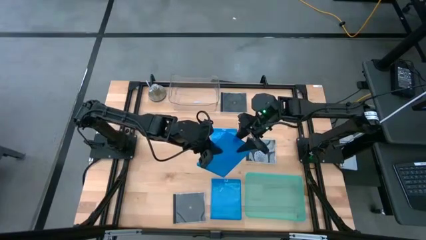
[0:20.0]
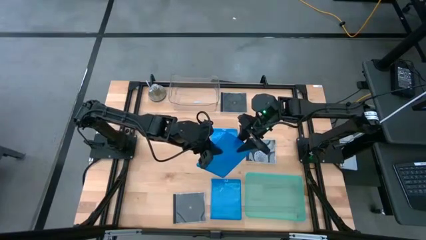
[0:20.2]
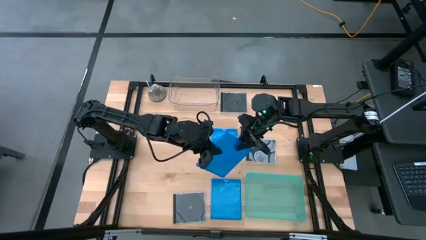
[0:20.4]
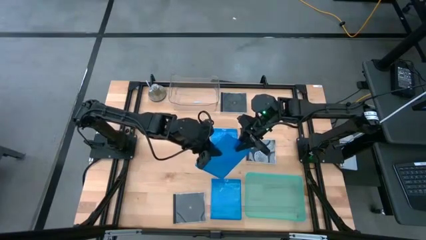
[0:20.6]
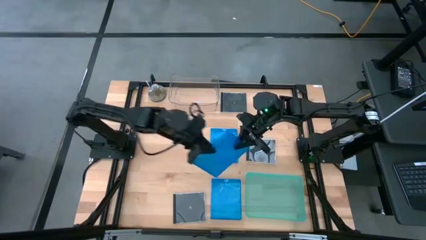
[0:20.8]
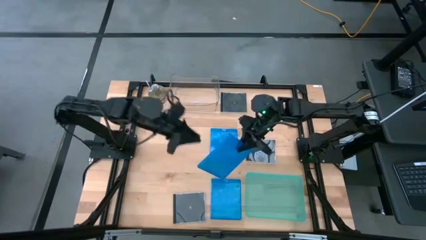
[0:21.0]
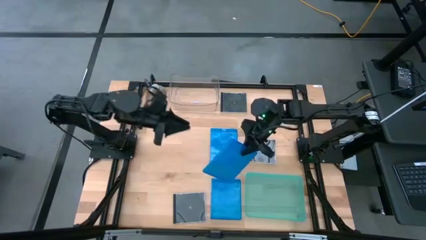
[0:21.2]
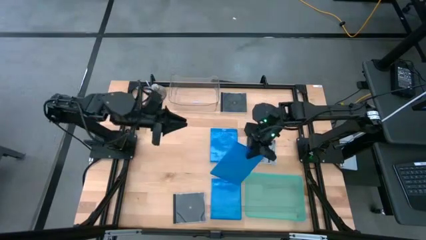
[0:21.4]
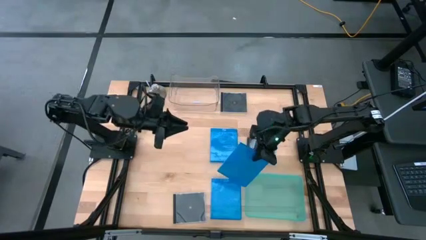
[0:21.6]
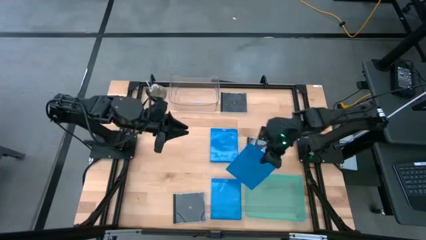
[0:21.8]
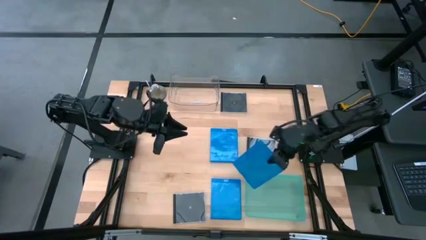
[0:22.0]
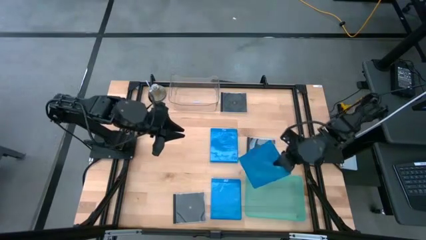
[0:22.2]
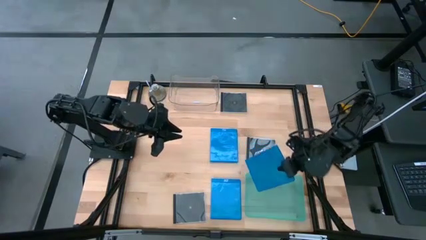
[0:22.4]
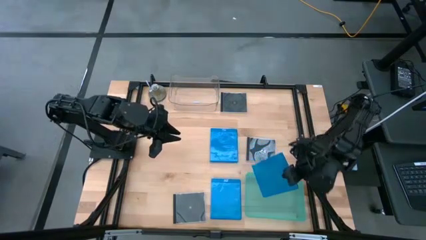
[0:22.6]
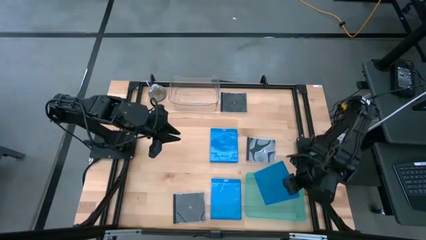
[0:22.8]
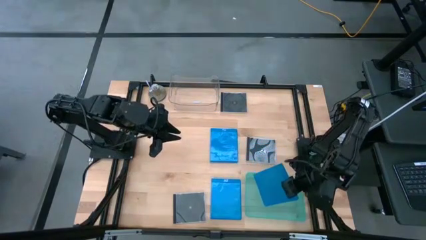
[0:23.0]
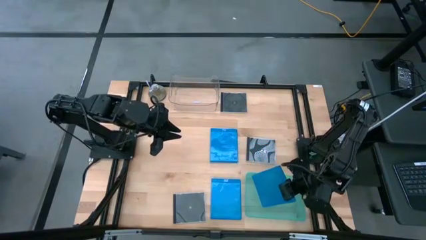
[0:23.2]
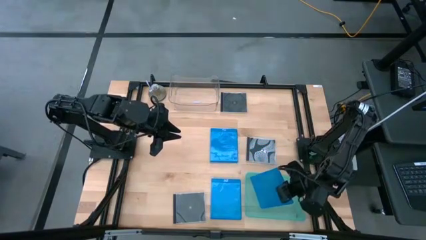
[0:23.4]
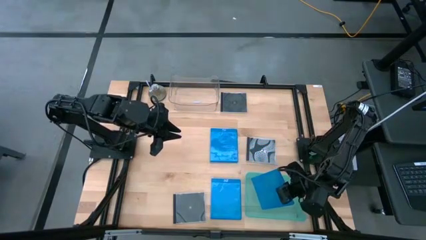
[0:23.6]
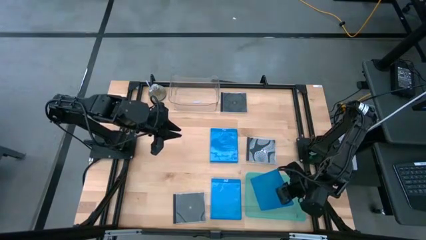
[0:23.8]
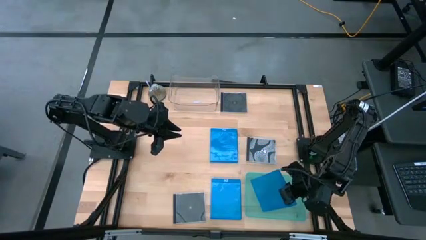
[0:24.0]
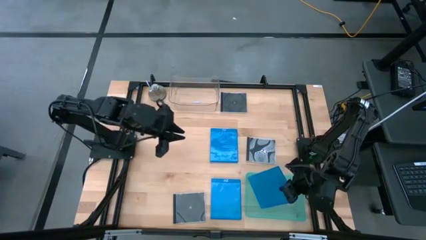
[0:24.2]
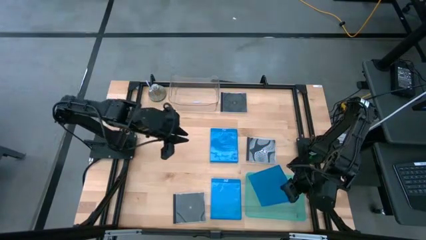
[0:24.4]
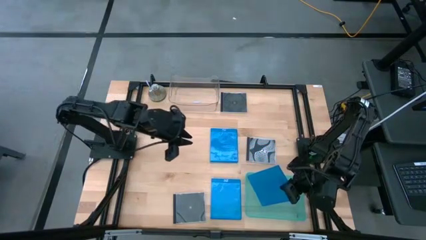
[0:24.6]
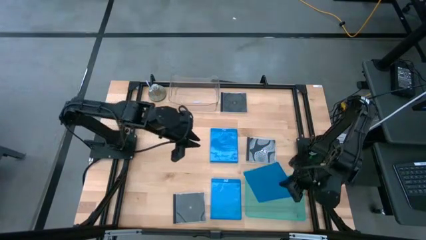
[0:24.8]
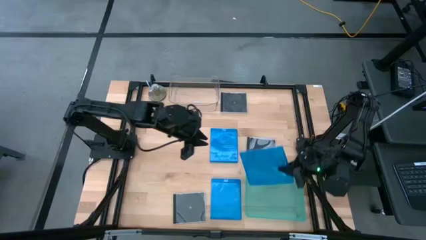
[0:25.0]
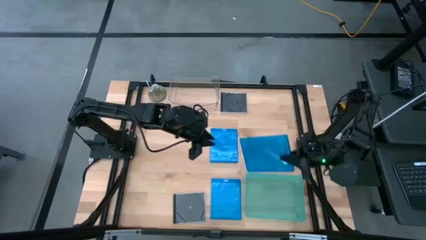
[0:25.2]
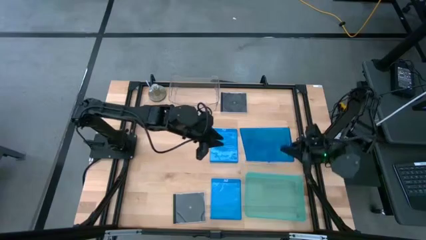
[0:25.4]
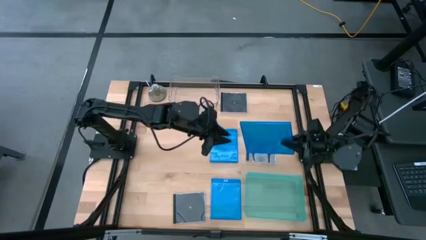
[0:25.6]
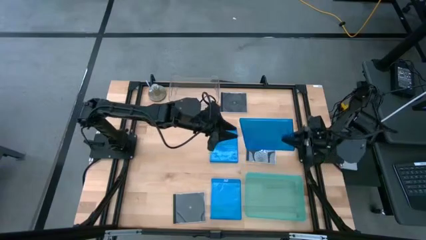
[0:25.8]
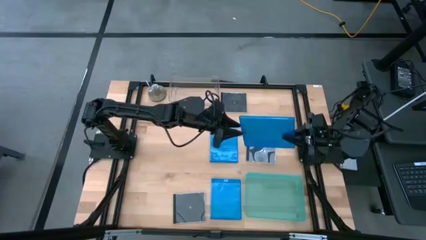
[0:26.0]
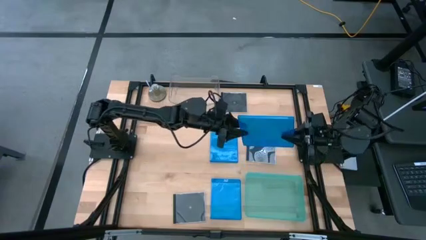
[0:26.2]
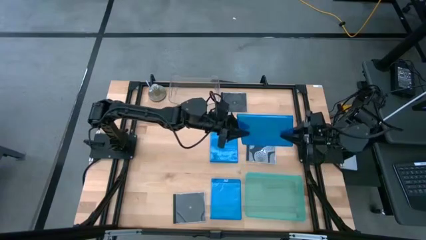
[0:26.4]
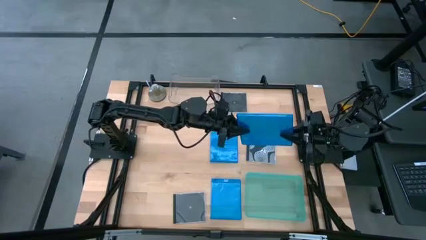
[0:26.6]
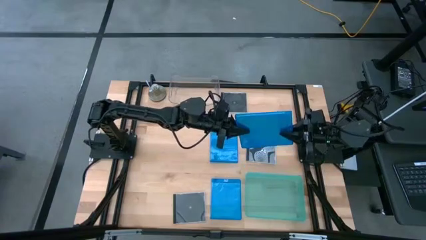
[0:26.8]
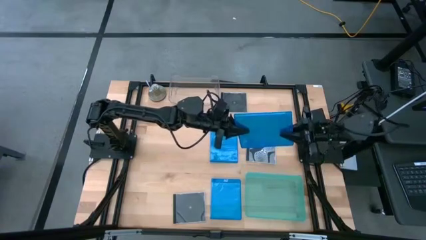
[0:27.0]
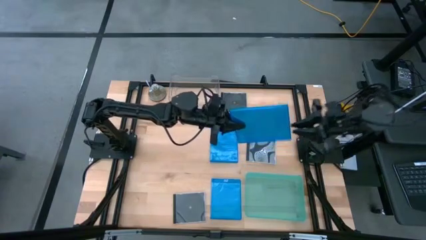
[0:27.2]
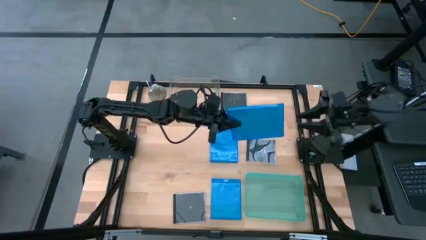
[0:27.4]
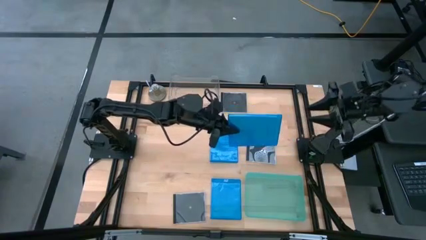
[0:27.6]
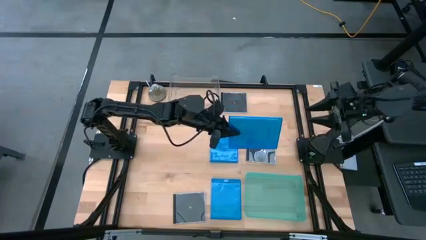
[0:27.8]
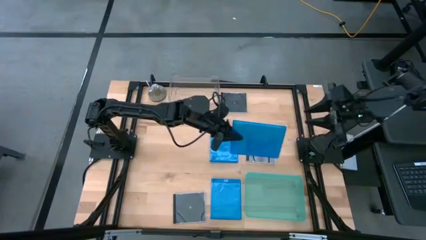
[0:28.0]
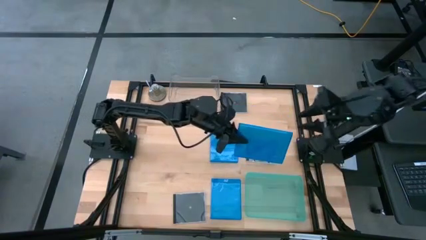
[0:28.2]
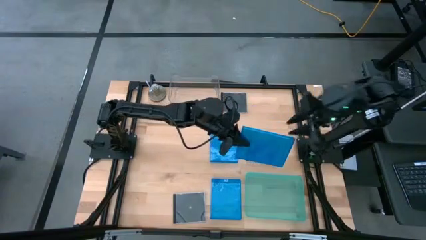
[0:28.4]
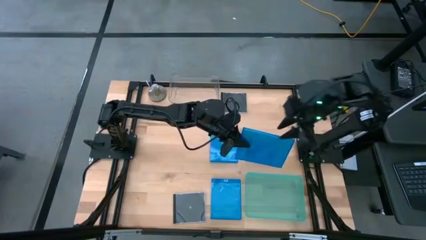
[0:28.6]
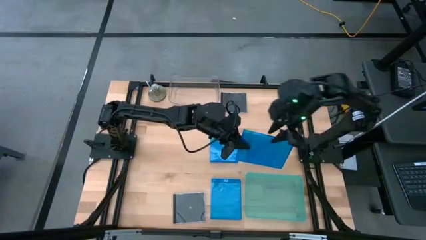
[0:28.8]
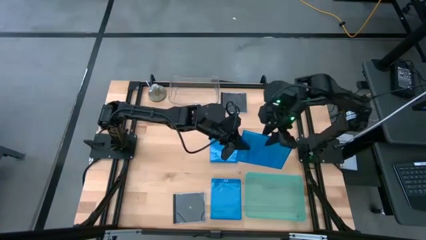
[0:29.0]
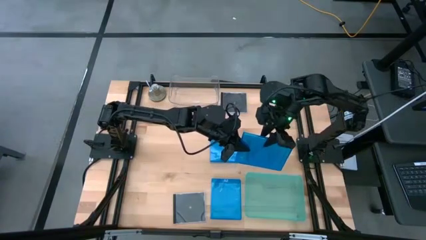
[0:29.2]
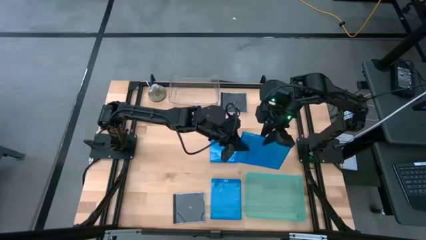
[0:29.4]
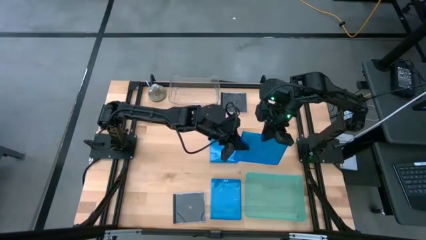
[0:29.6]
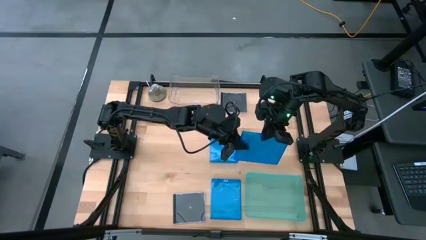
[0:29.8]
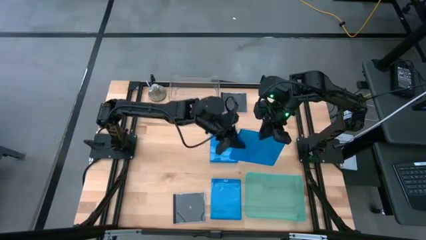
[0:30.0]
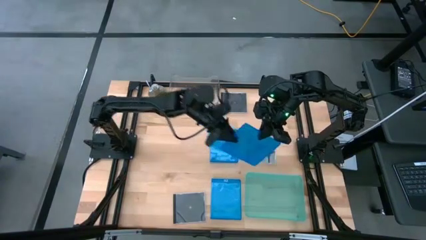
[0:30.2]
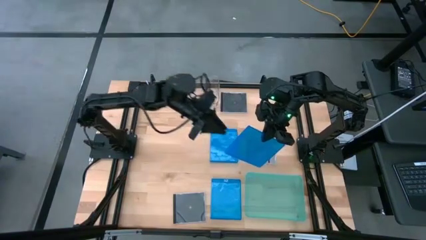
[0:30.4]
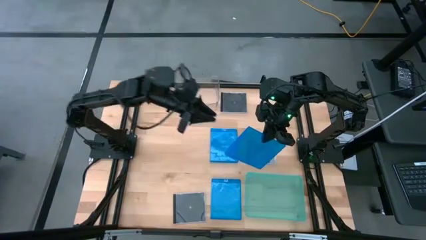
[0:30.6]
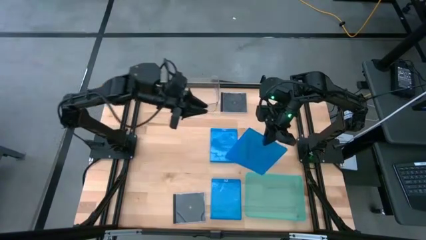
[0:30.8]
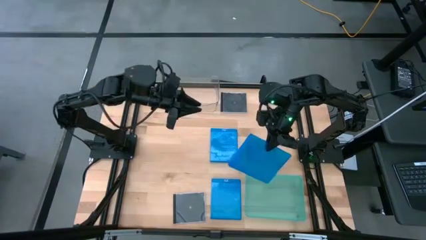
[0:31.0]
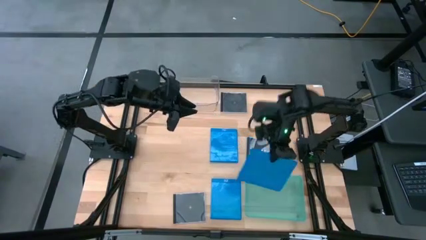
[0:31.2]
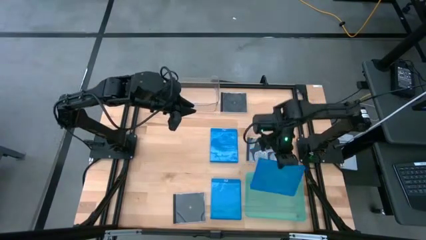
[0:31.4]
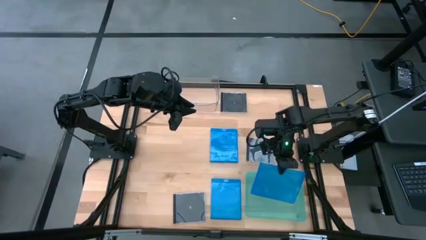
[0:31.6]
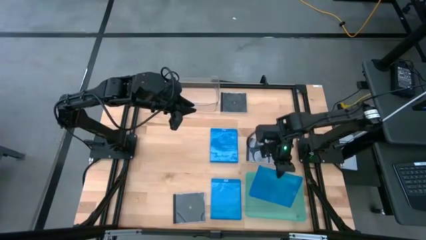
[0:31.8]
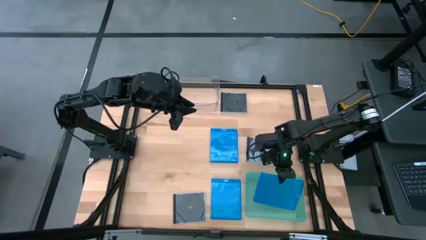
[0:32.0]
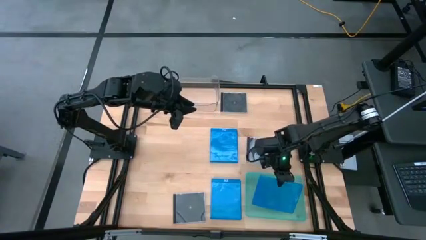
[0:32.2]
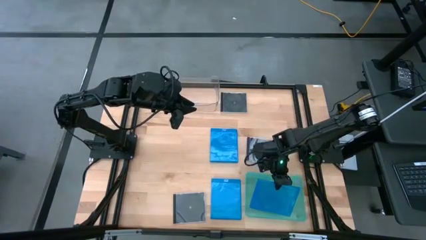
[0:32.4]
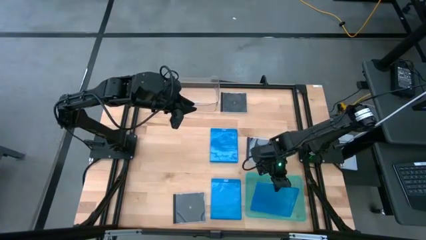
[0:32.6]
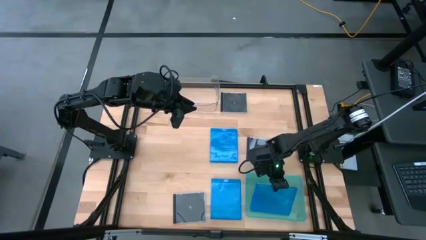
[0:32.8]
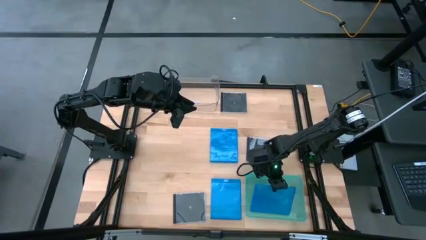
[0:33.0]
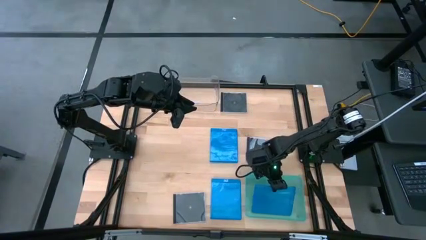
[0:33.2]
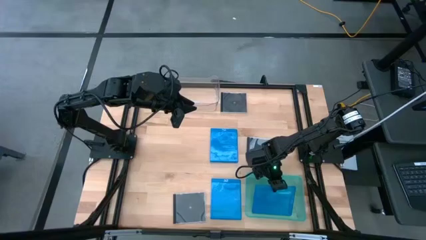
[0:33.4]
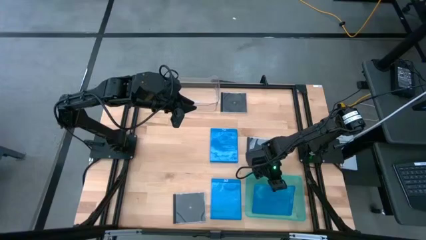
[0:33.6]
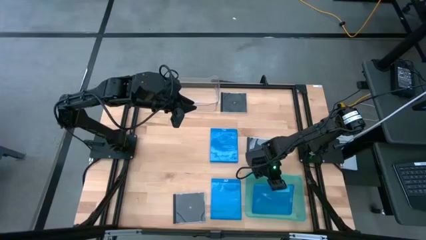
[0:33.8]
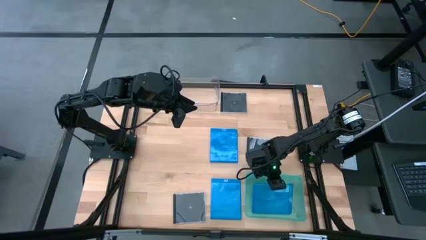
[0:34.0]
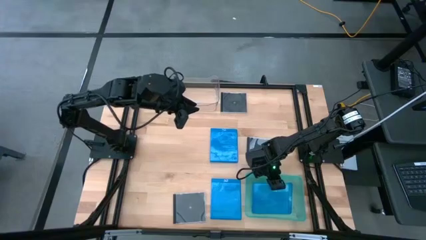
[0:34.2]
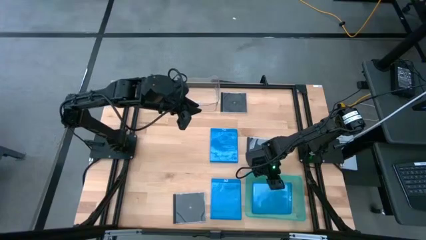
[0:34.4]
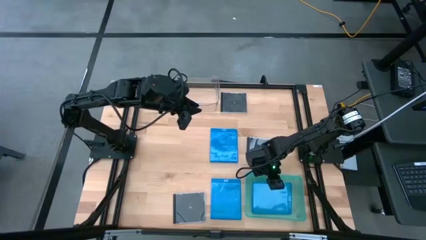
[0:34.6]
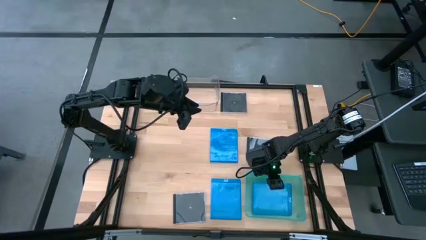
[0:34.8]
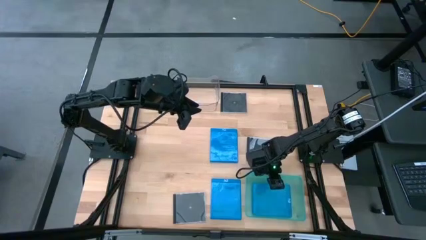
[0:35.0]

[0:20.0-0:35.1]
Task: Pick & place jewel cases by type
Put the top left blue cd case into the green bin
